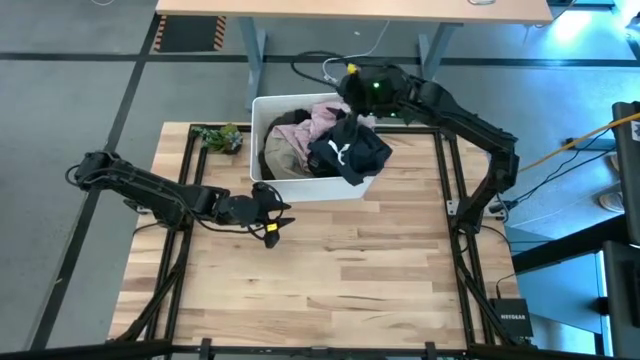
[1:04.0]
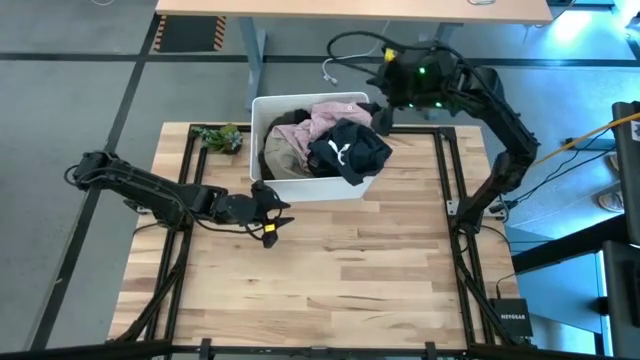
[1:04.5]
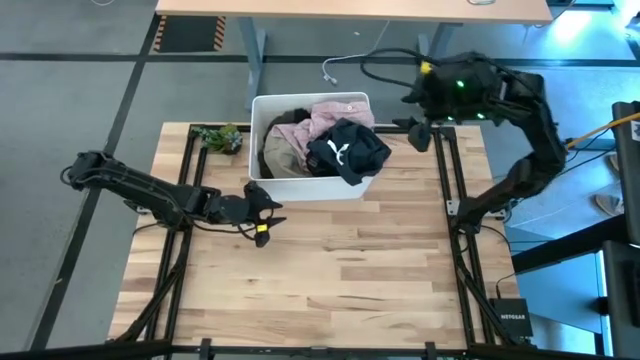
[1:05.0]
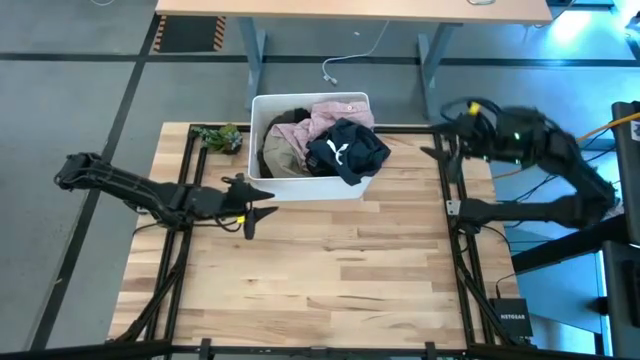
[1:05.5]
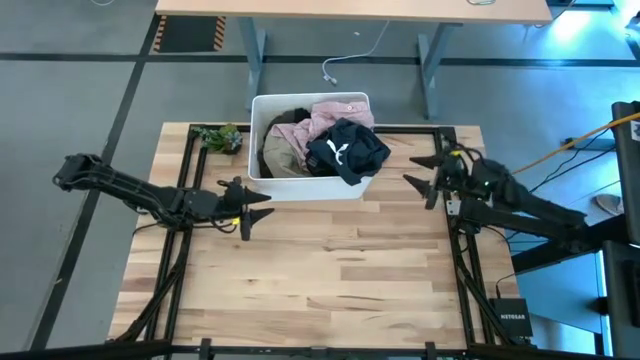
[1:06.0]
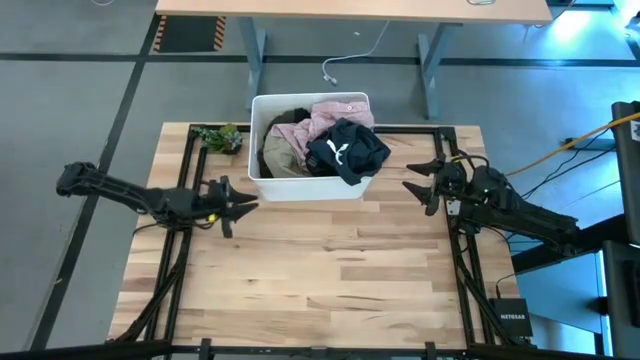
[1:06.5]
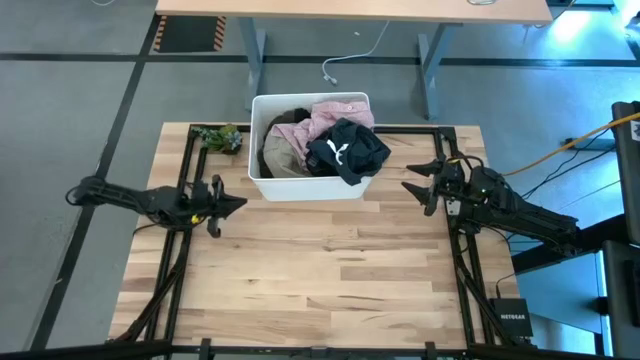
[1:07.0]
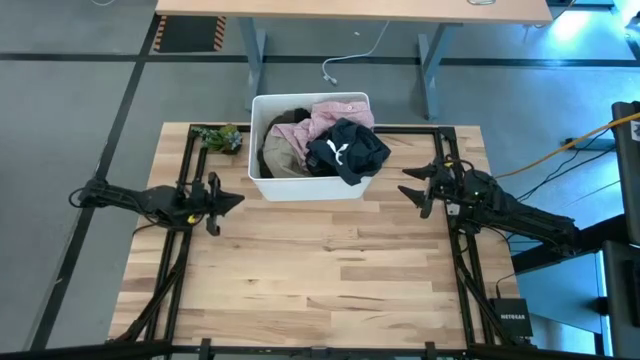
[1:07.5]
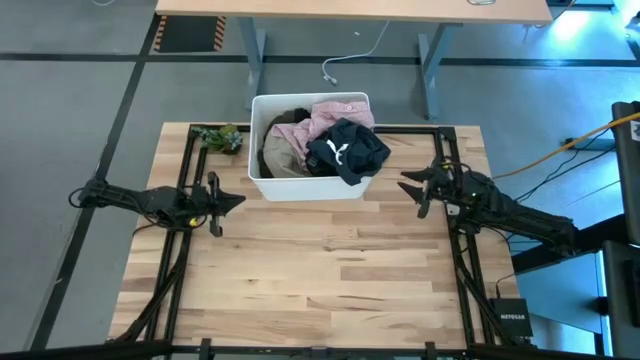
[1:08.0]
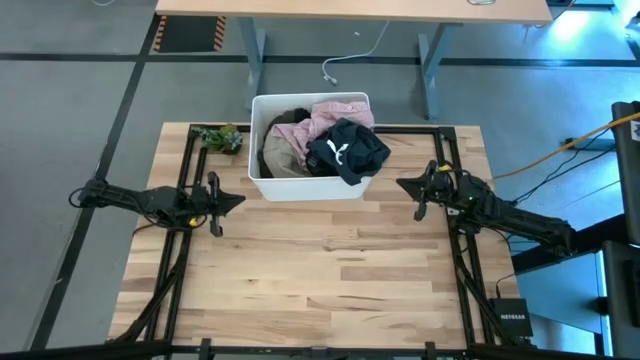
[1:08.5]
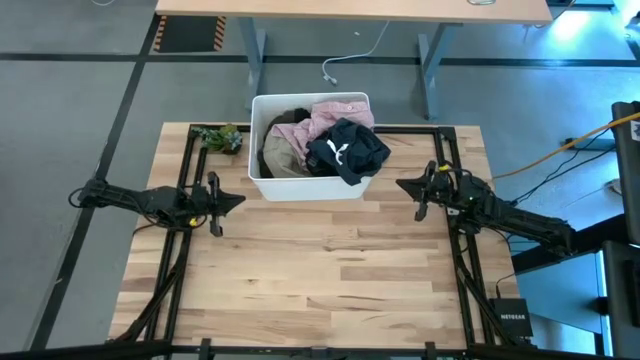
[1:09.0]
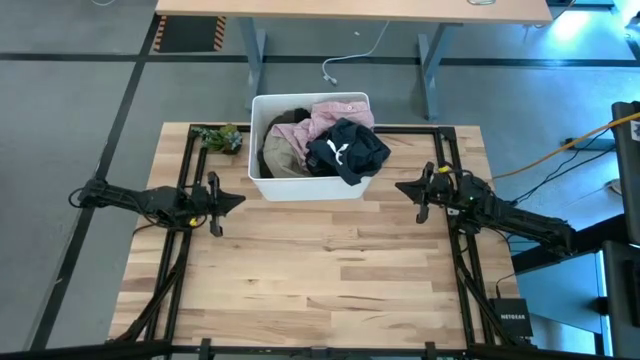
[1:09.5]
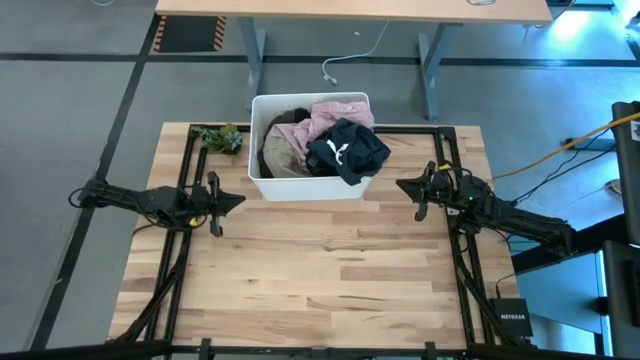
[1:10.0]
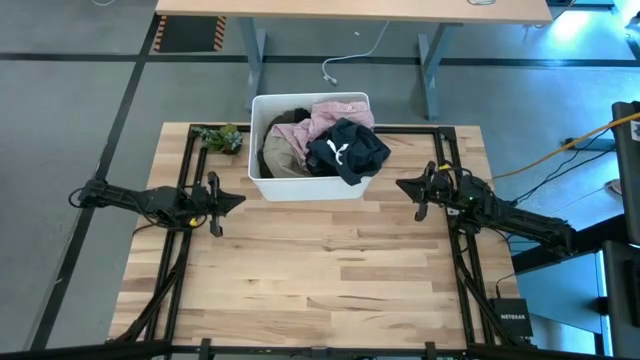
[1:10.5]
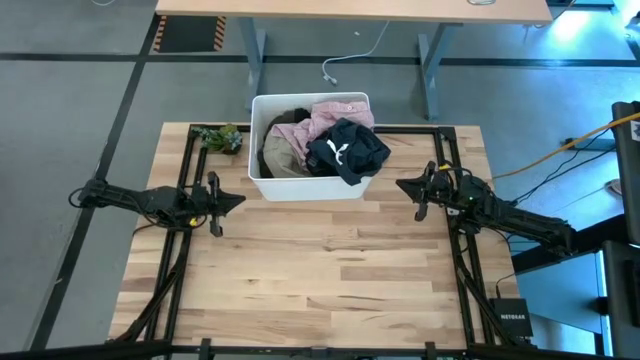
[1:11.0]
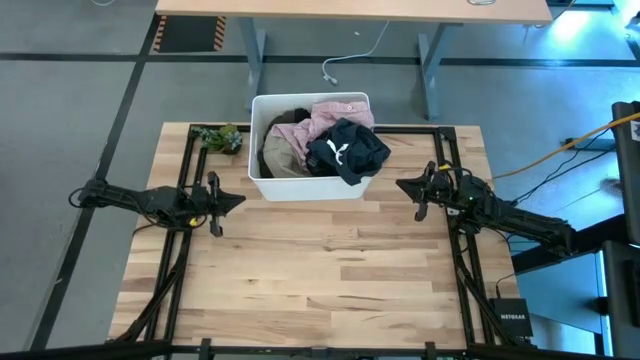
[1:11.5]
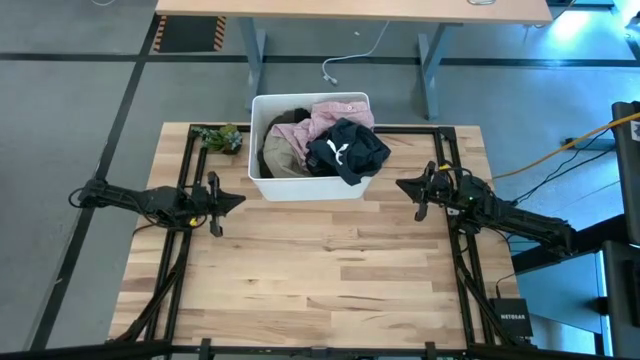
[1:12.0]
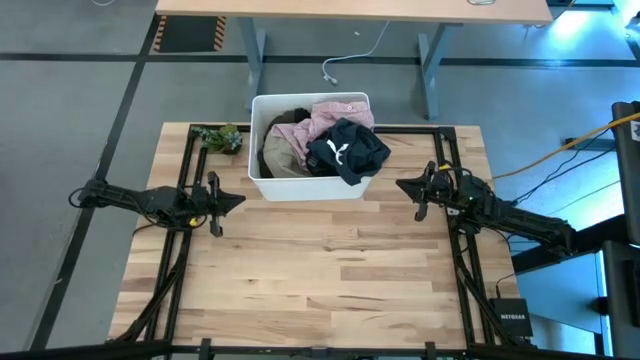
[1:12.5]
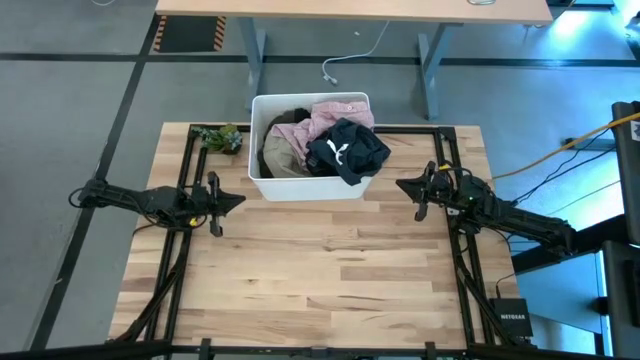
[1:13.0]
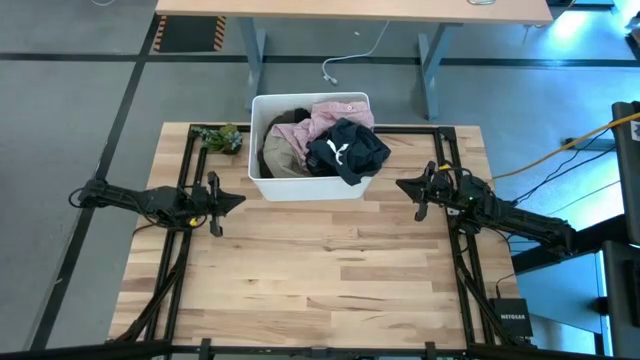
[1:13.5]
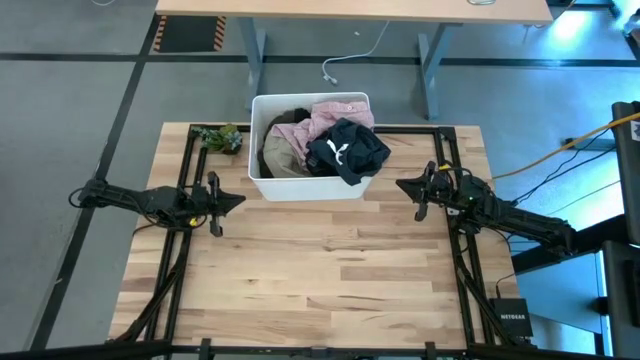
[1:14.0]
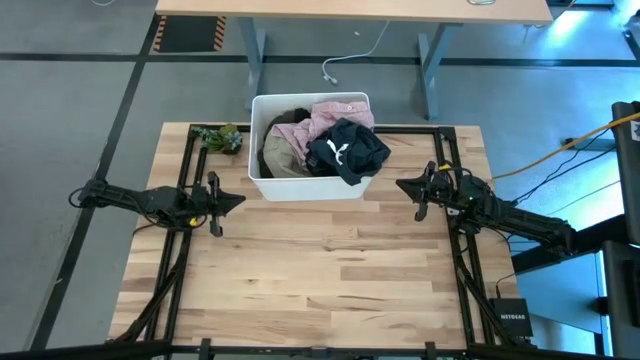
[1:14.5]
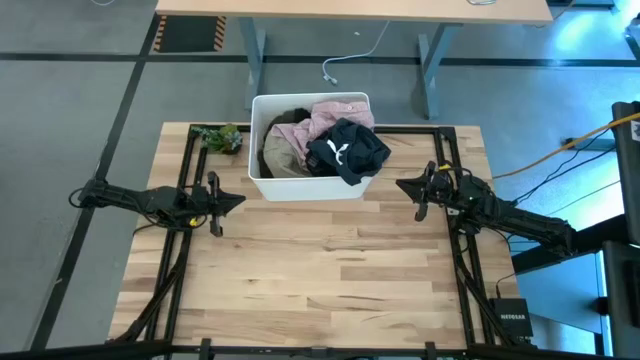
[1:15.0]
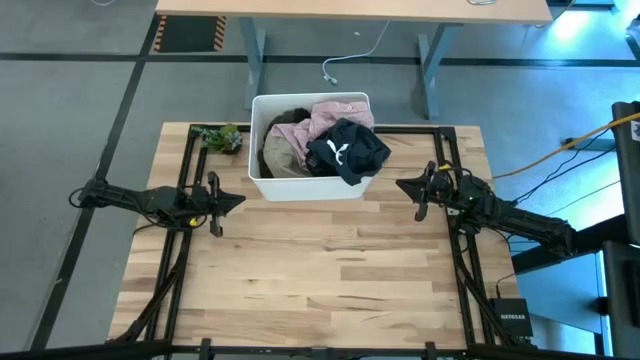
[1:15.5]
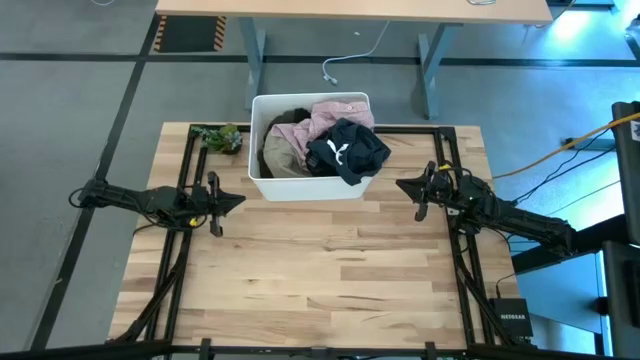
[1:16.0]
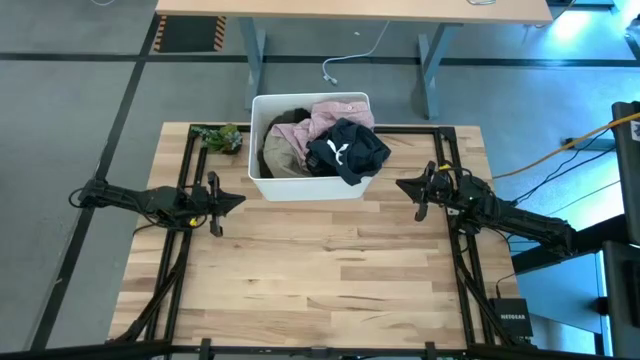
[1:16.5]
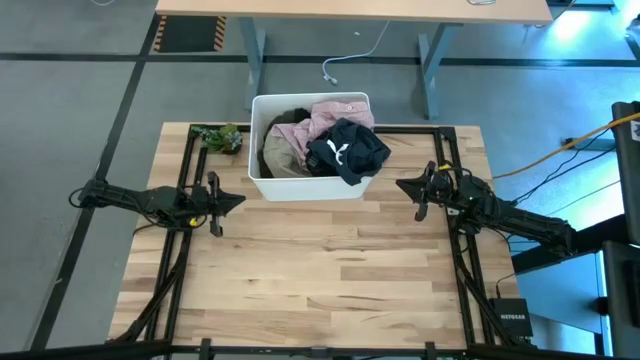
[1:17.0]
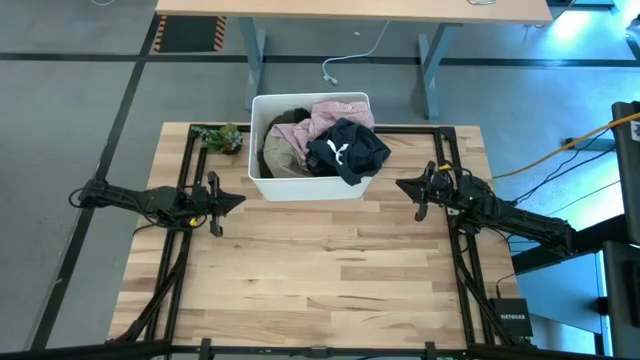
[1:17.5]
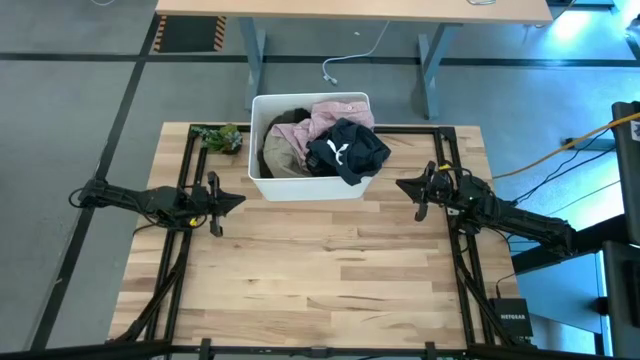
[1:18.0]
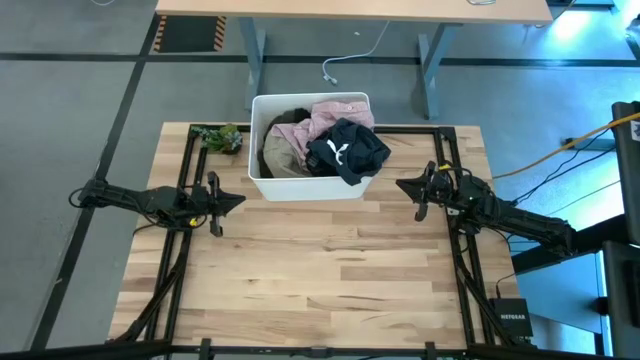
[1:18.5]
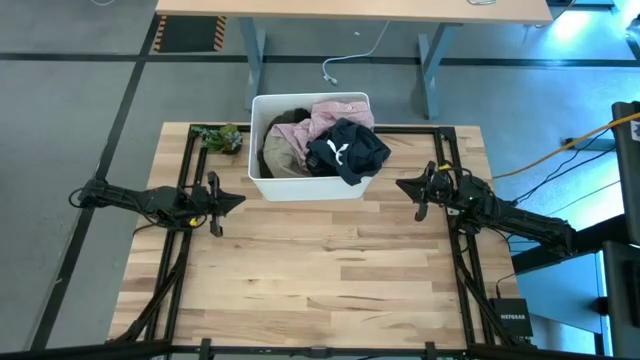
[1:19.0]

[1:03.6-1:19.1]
Task: Sort clothes
Return to Home Position

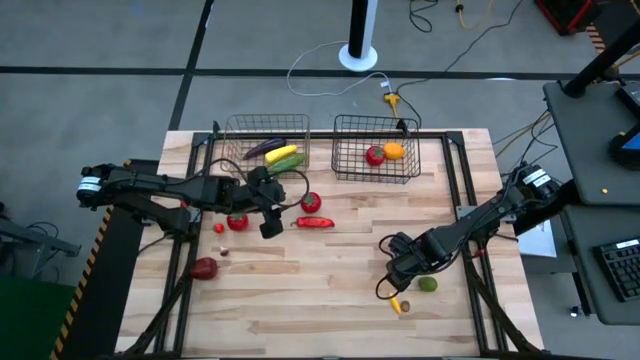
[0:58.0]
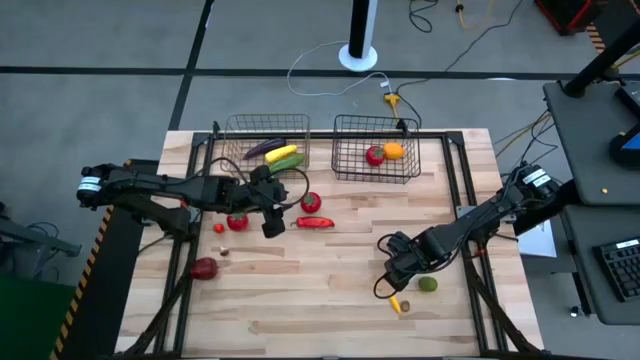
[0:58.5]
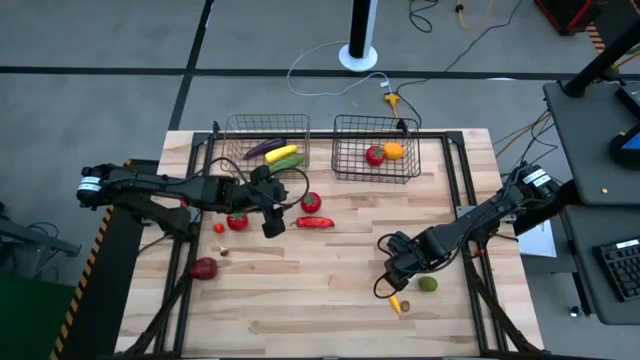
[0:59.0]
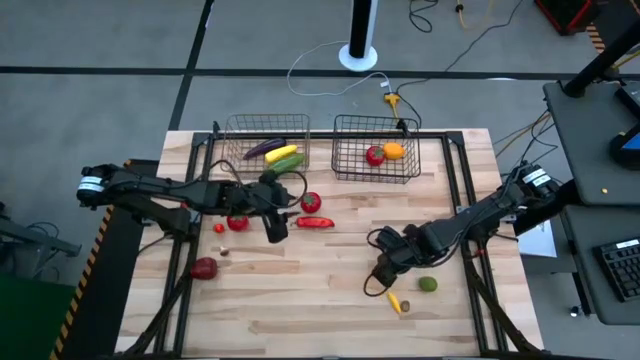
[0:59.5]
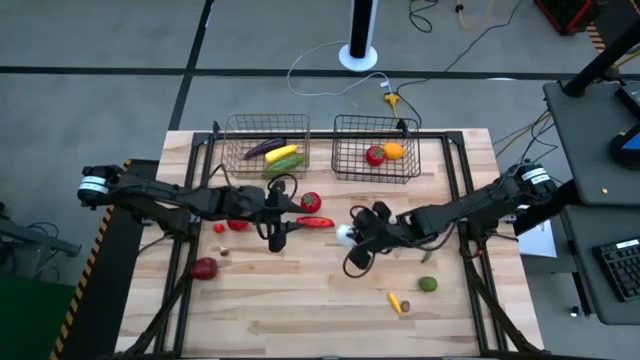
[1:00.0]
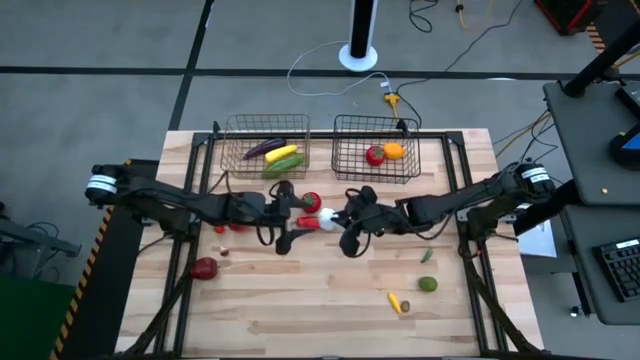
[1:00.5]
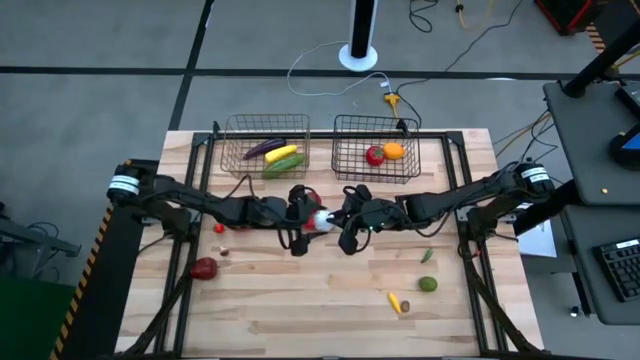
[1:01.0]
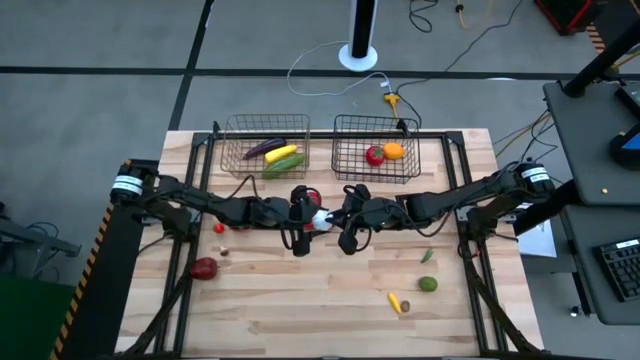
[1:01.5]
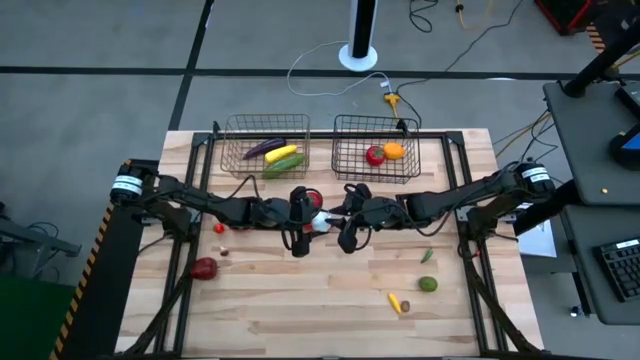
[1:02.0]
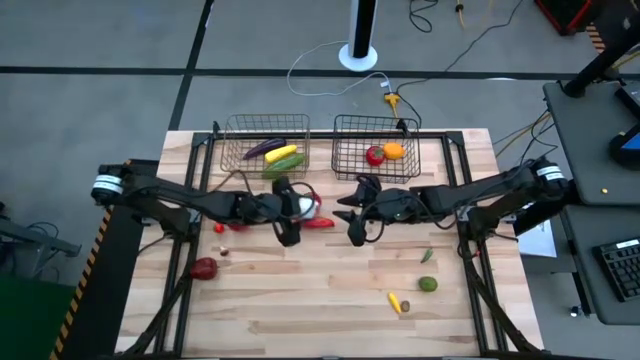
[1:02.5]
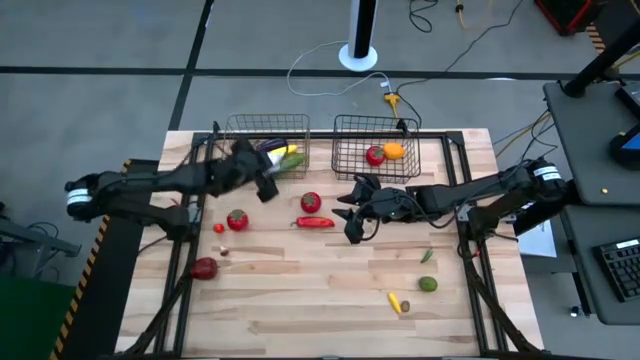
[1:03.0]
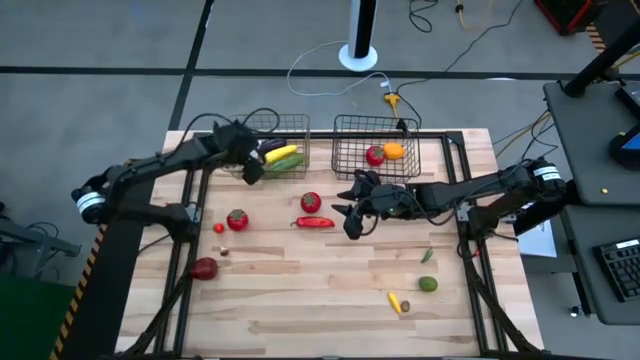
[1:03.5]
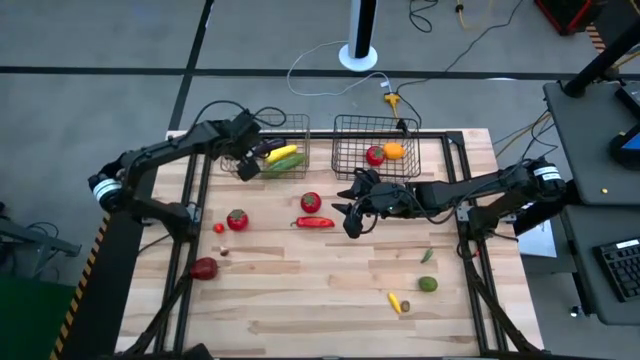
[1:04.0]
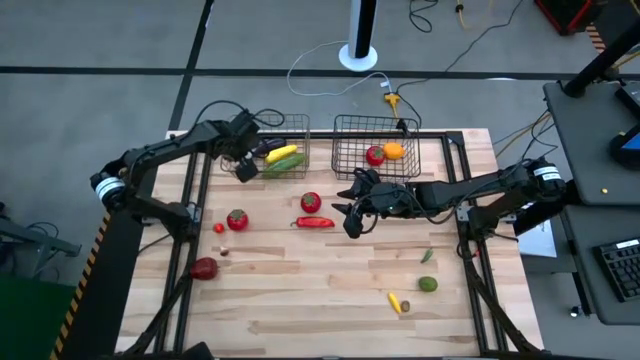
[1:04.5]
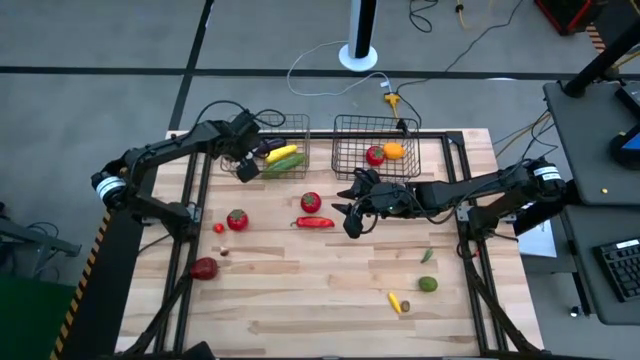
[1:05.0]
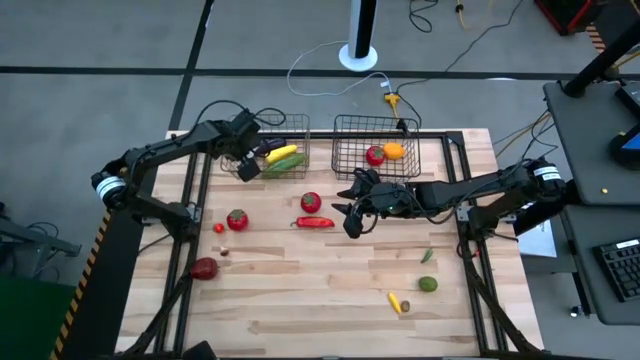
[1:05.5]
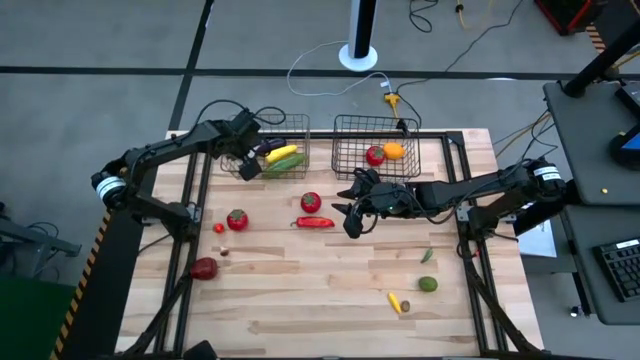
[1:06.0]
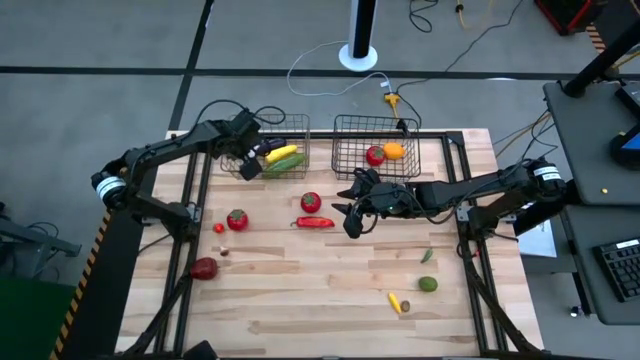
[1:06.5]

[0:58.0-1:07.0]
Task: Sort produce into baskets
Put the white garlic into the left wire basket
